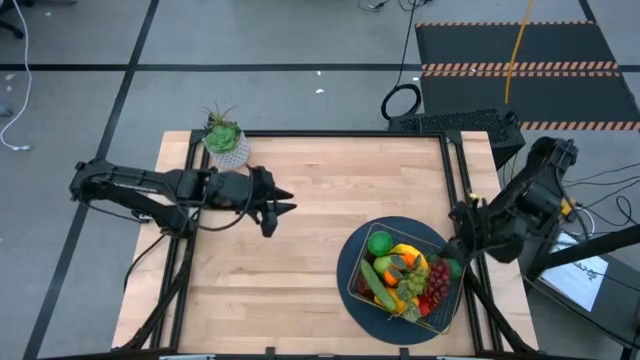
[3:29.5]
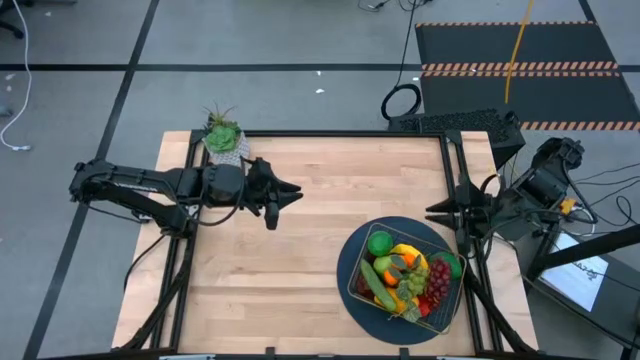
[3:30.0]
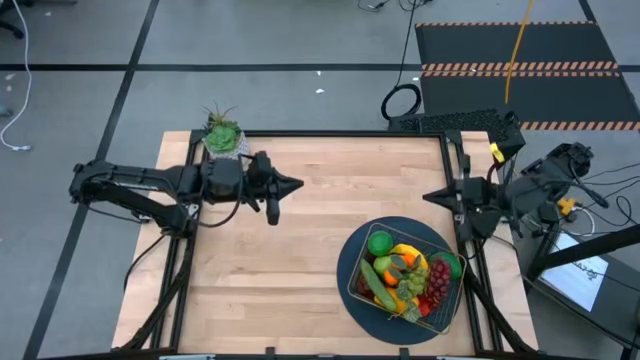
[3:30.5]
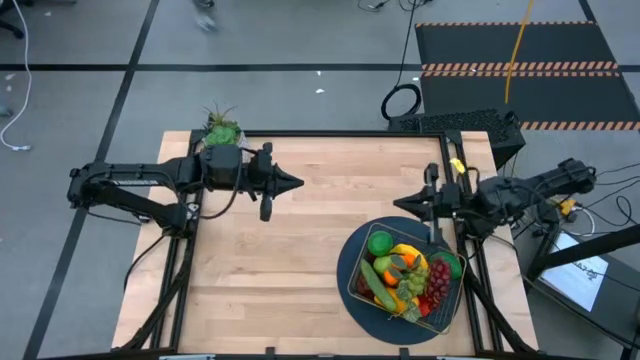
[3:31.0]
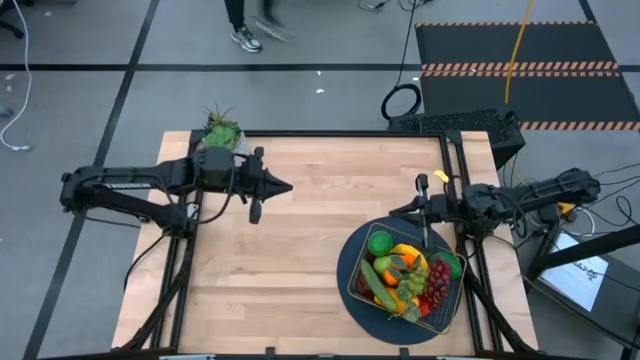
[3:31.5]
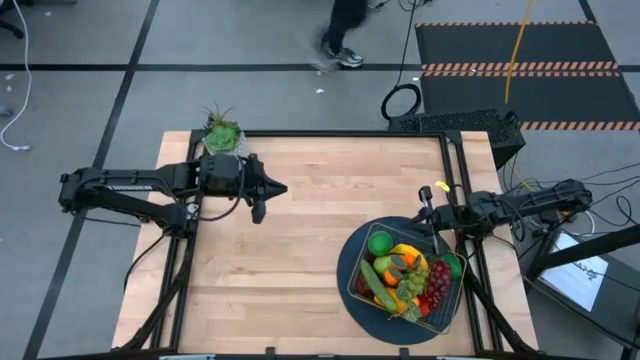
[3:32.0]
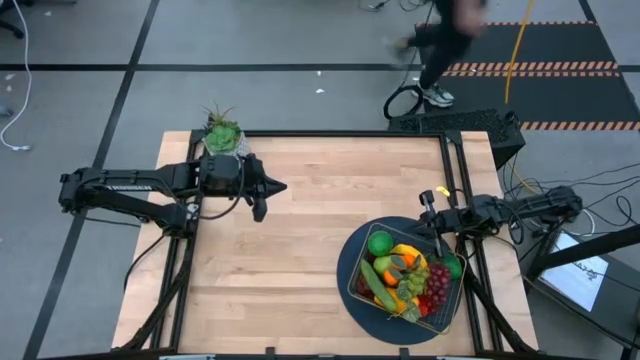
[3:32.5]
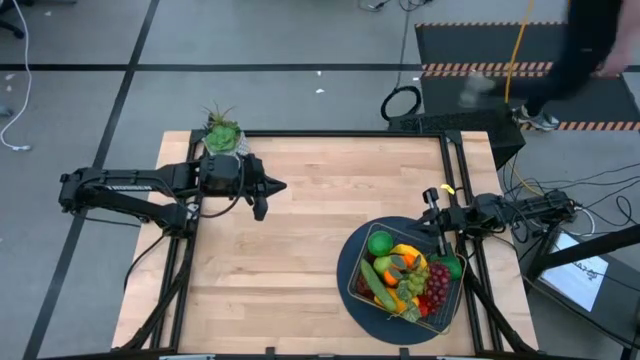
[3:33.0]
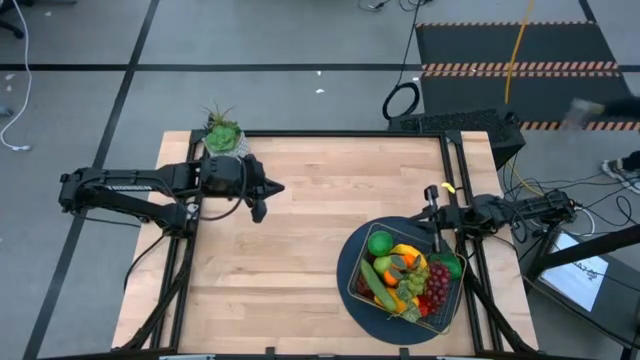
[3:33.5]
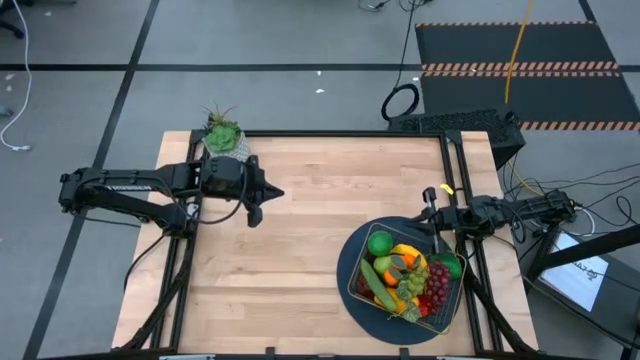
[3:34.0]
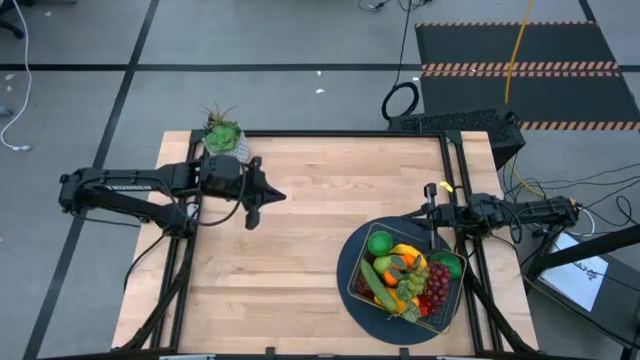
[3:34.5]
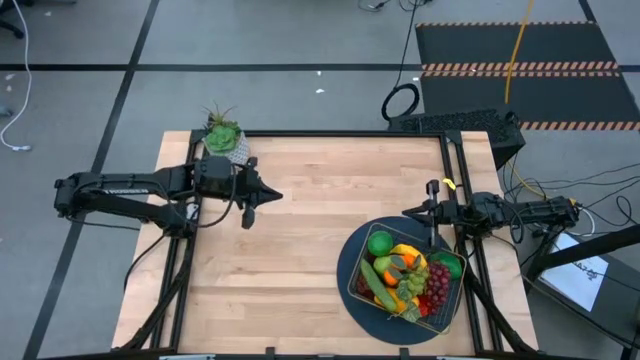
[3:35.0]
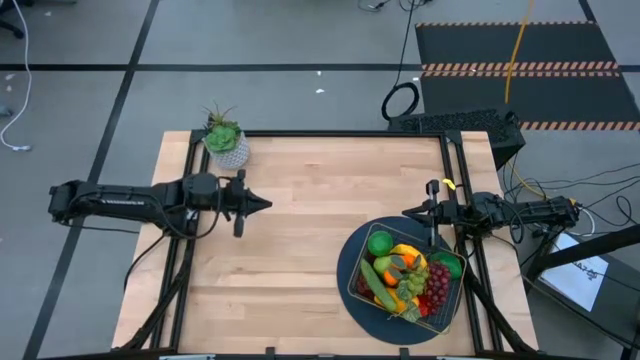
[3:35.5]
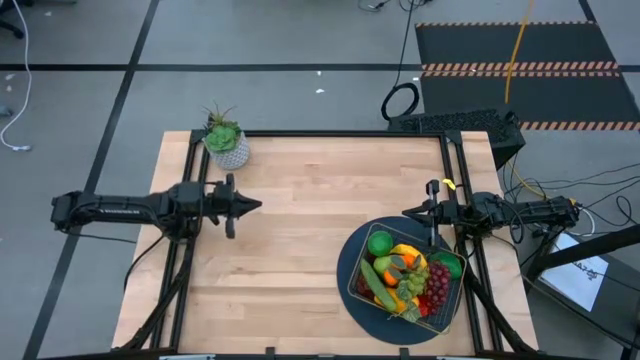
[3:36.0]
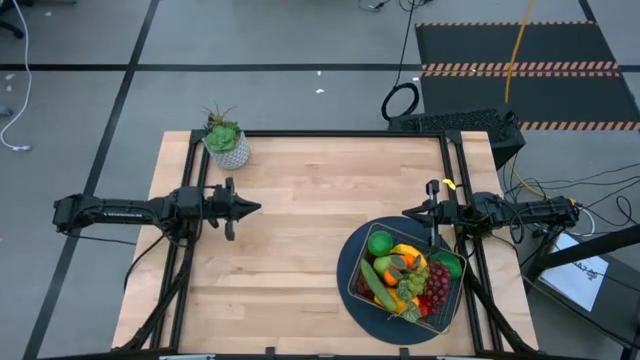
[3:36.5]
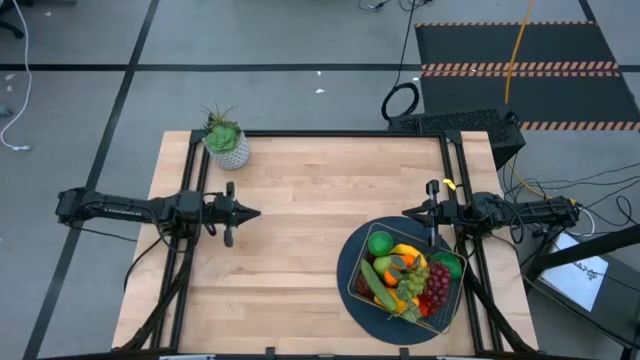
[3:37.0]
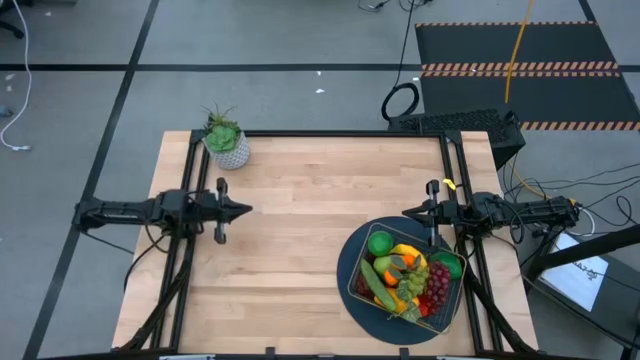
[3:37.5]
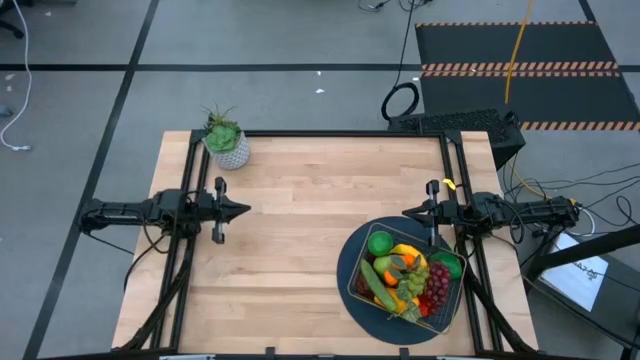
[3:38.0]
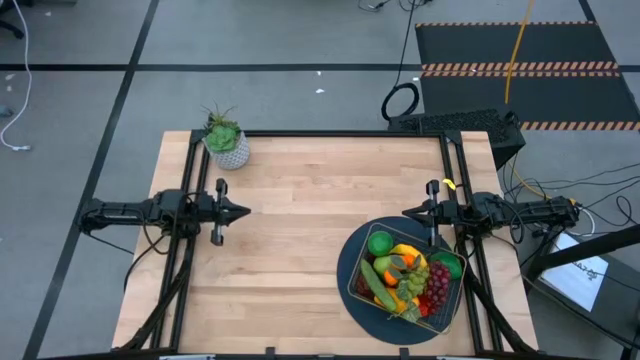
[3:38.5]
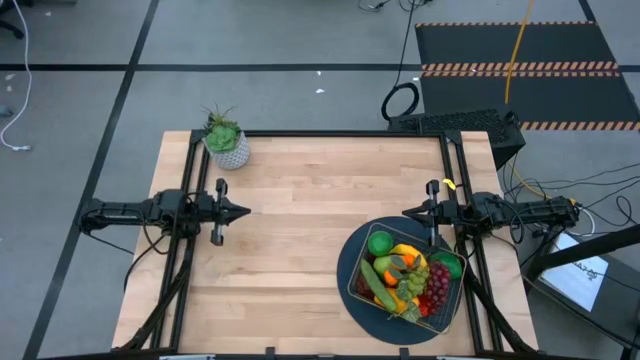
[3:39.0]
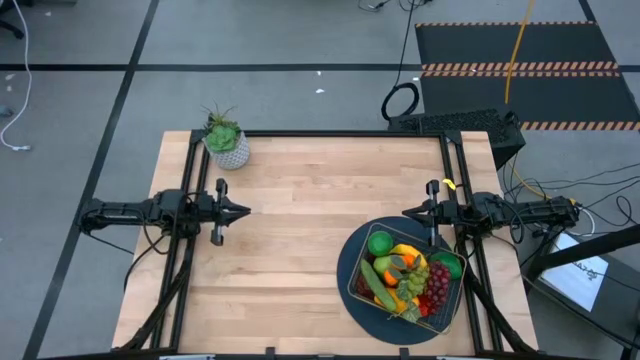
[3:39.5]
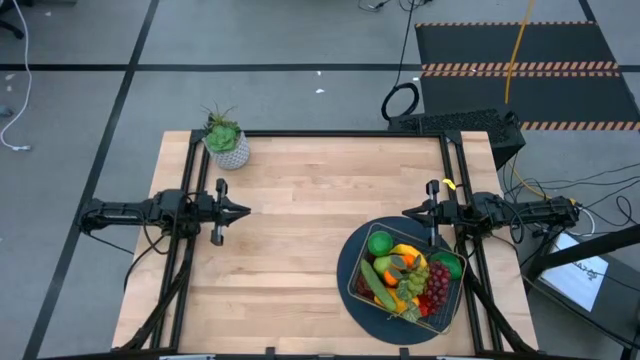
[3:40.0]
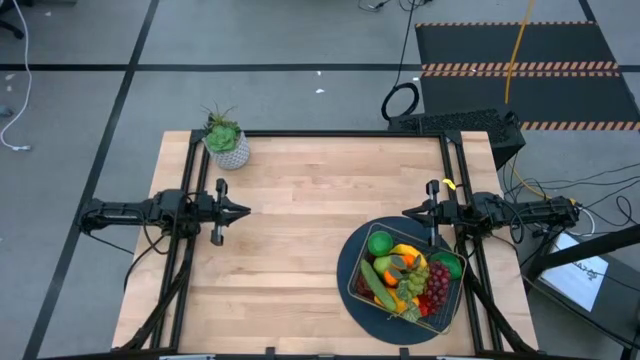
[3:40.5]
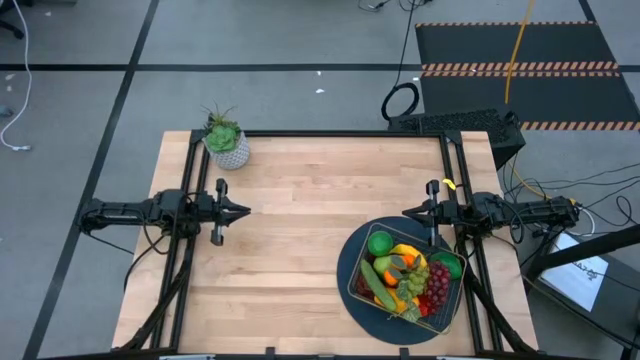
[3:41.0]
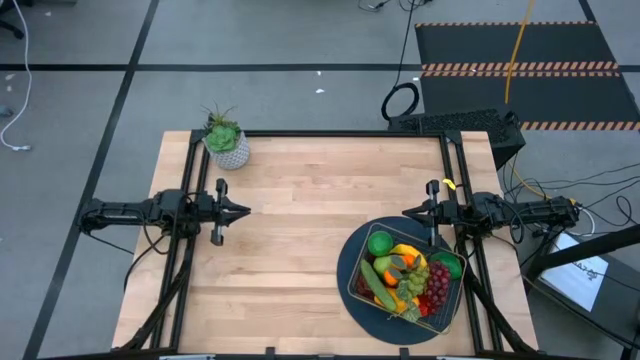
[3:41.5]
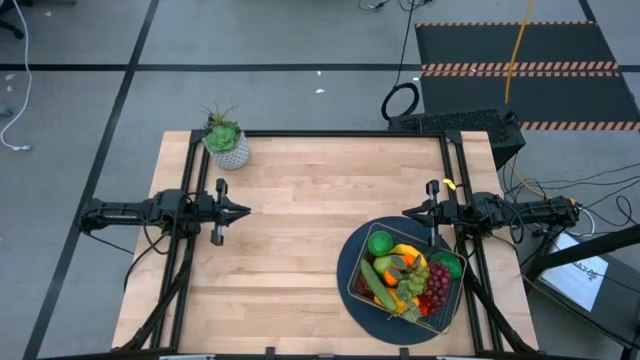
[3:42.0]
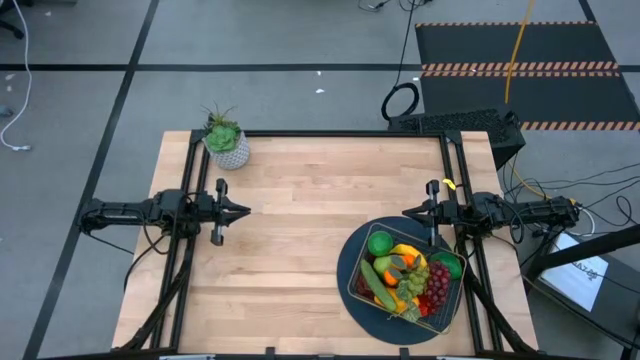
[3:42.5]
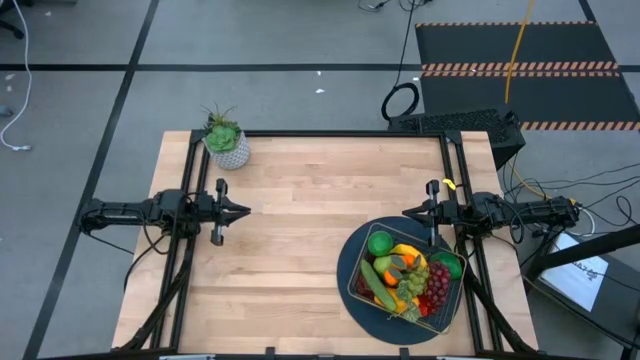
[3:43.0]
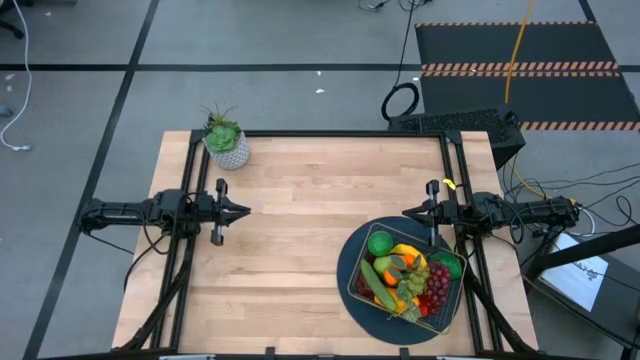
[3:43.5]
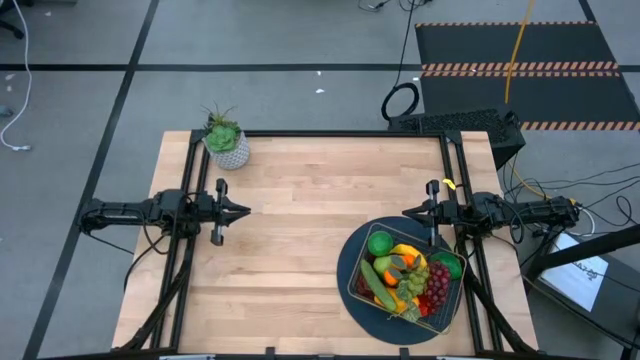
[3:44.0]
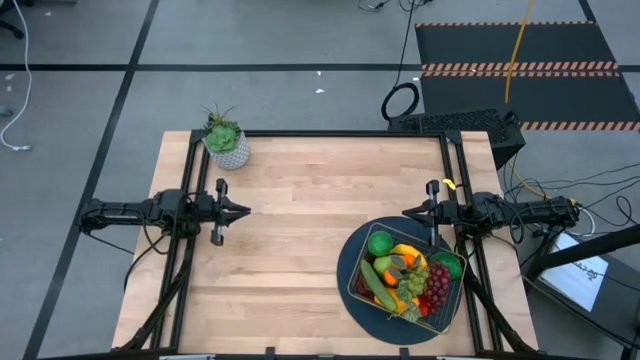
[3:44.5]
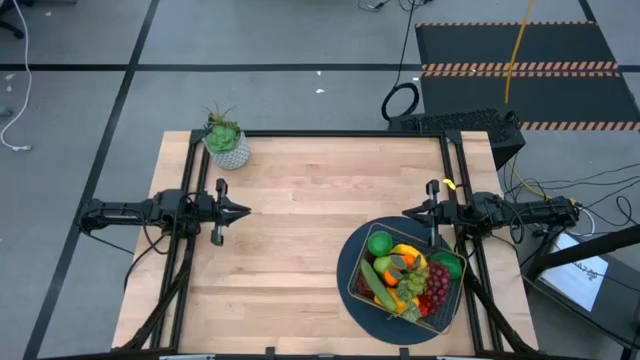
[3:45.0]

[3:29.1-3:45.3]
Task: Build produce basket
Return to Home Position

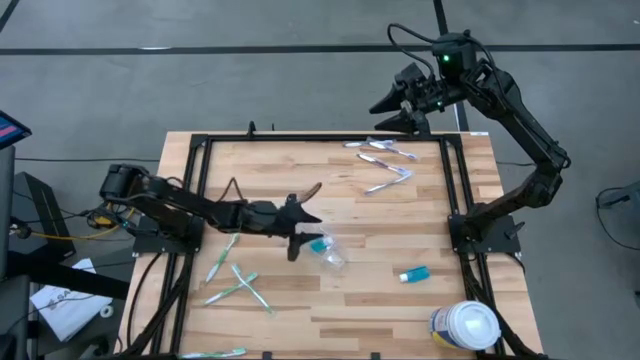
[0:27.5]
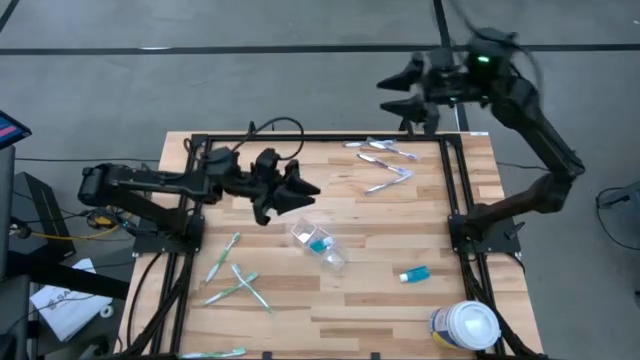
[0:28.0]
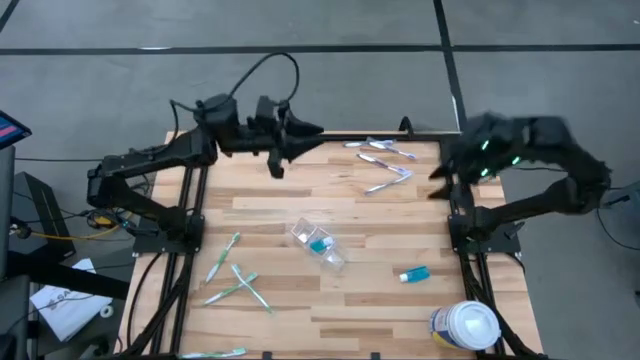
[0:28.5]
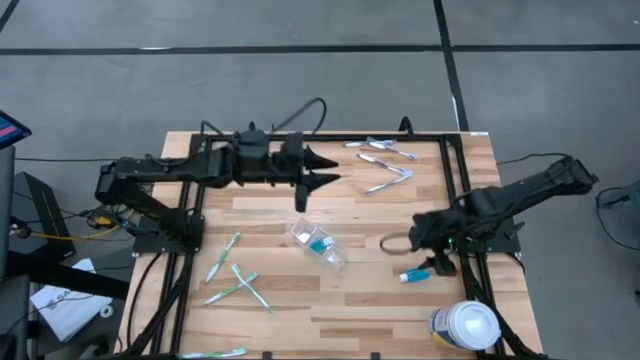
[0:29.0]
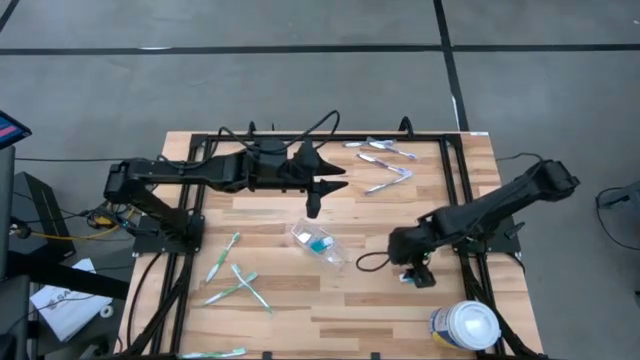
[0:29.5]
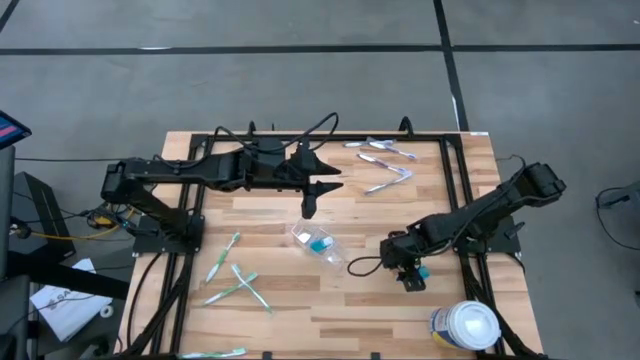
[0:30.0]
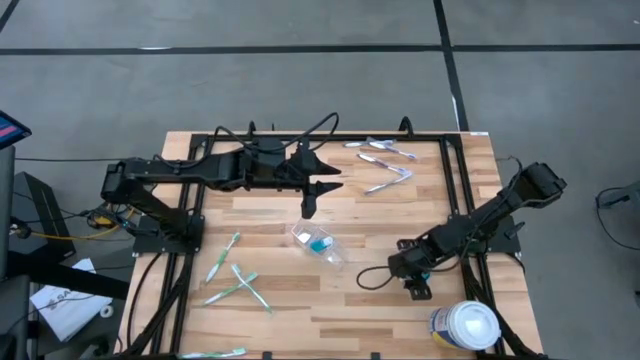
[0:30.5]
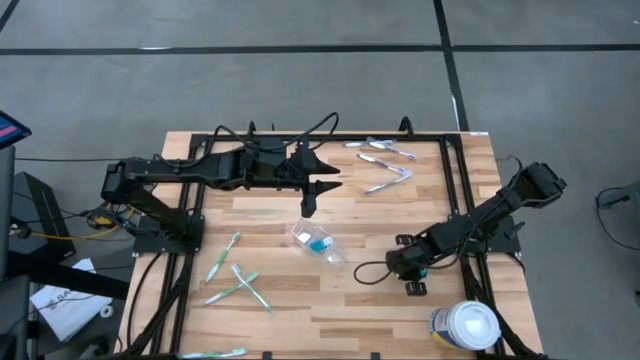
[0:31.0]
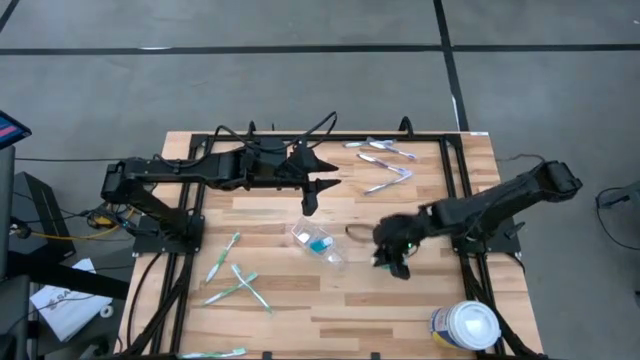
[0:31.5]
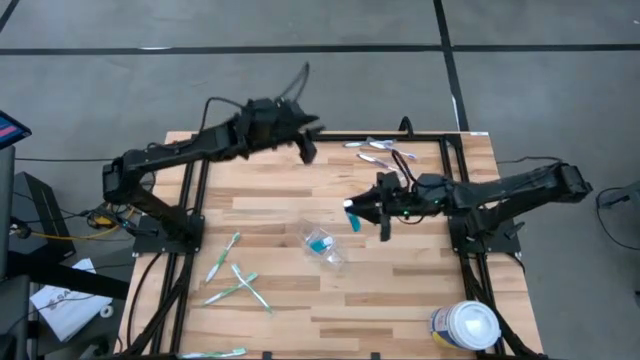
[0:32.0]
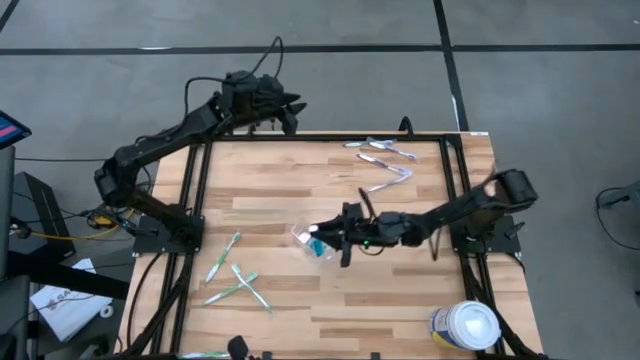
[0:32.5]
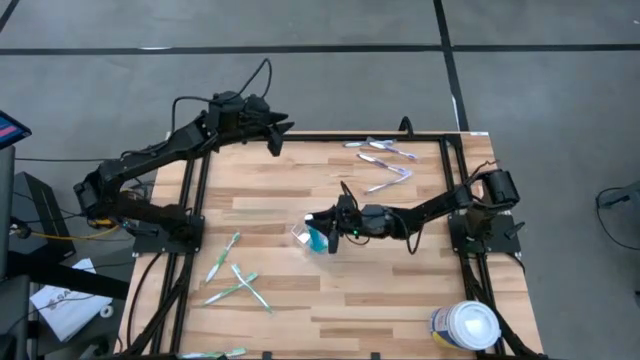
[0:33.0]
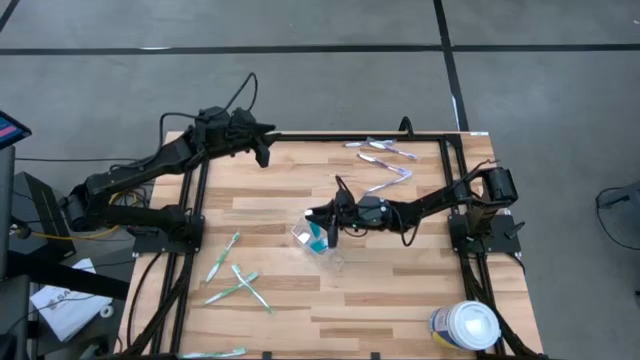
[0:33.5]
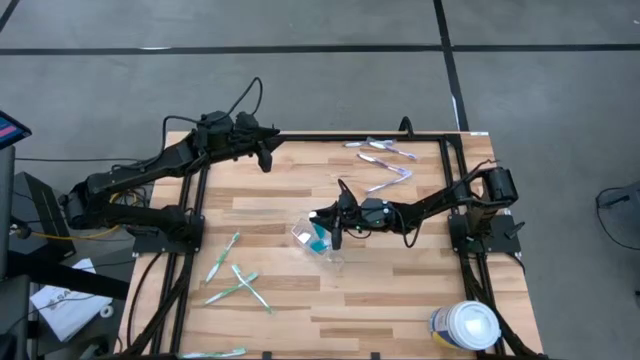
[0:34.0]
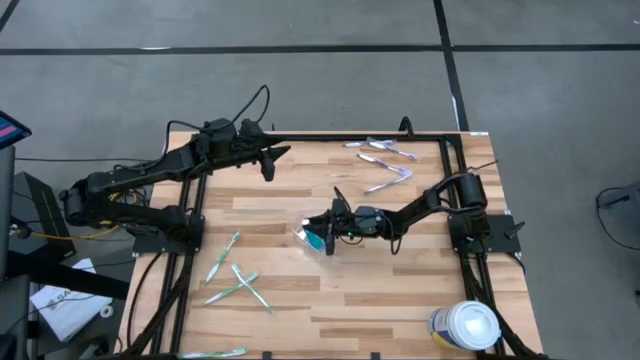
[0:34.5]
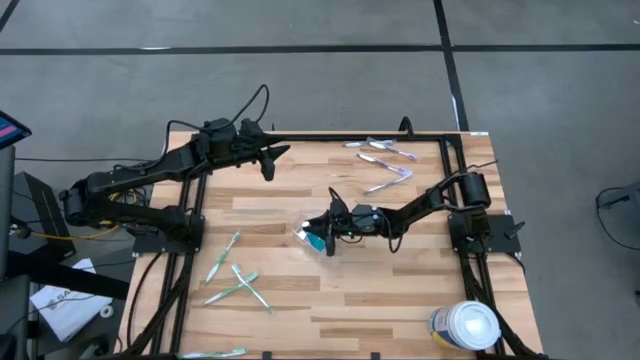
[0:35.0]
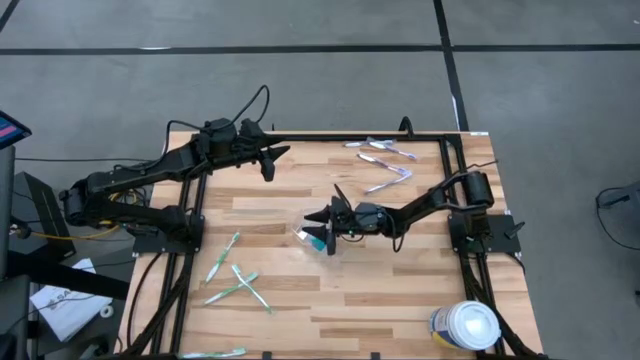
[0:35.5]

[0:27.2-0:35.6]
Task: Pick & Place toothbrushing station
Put the blue mouthwash bottle into the transparent organizer
